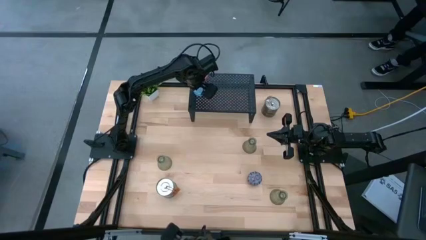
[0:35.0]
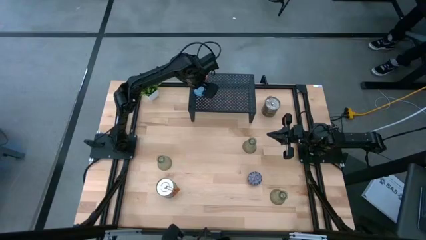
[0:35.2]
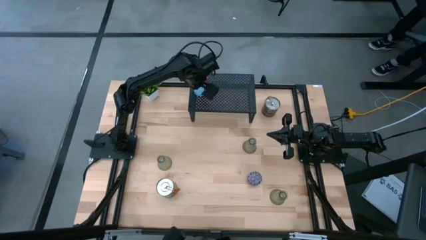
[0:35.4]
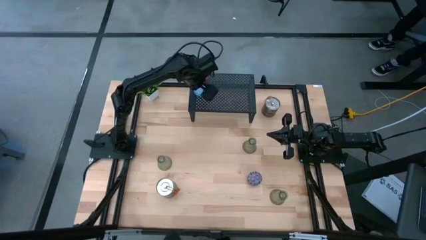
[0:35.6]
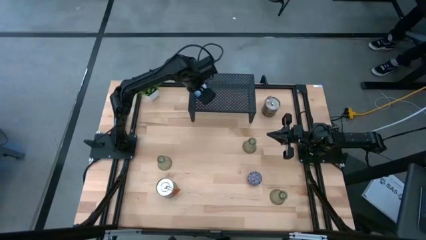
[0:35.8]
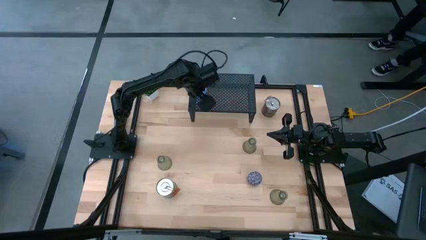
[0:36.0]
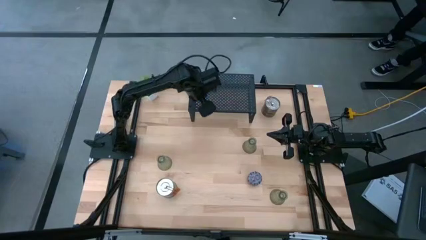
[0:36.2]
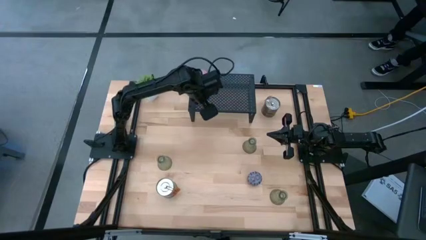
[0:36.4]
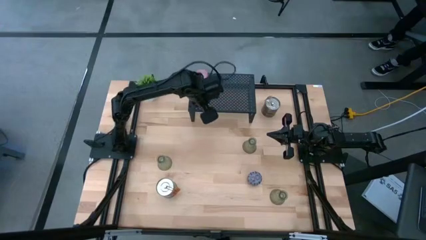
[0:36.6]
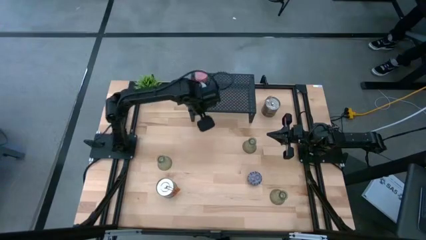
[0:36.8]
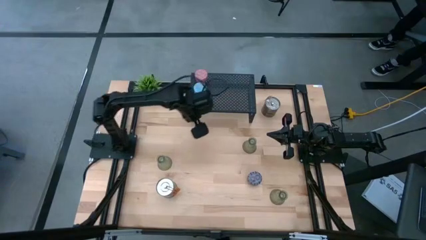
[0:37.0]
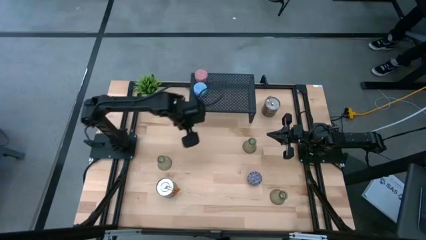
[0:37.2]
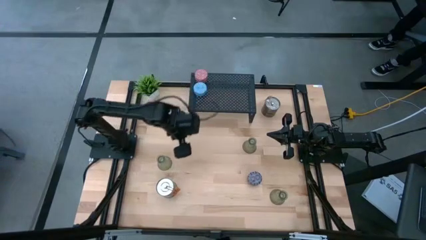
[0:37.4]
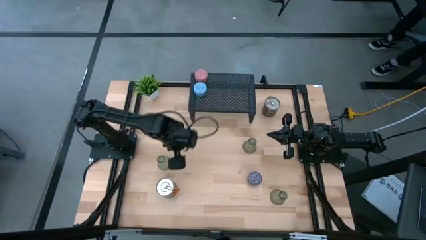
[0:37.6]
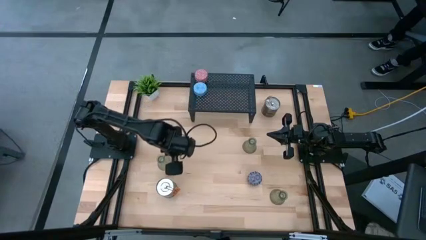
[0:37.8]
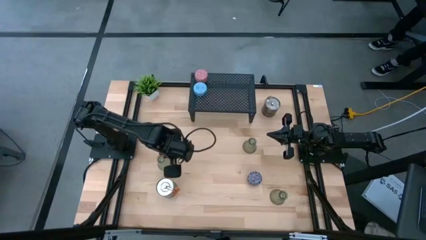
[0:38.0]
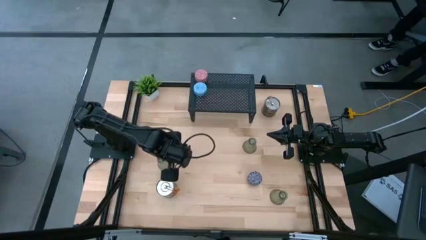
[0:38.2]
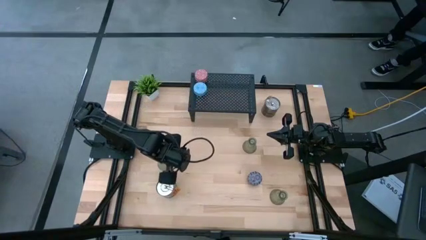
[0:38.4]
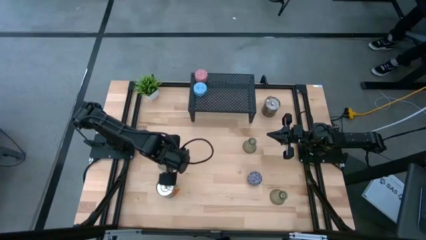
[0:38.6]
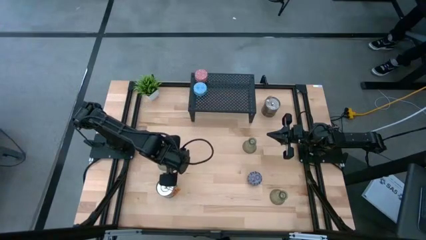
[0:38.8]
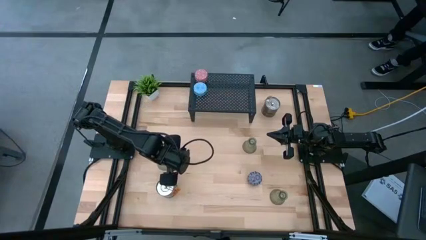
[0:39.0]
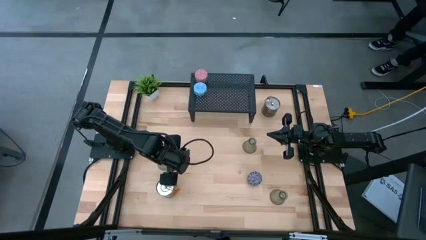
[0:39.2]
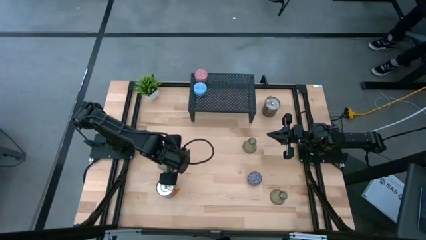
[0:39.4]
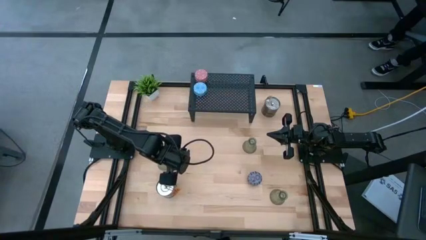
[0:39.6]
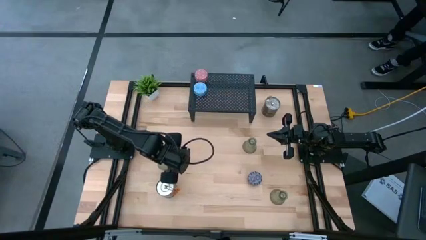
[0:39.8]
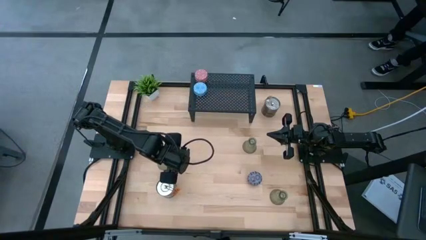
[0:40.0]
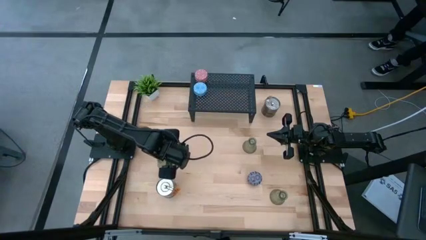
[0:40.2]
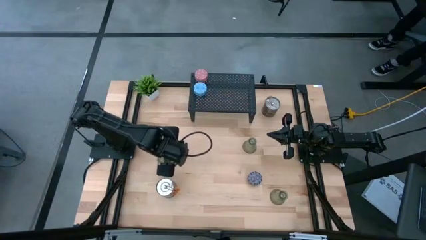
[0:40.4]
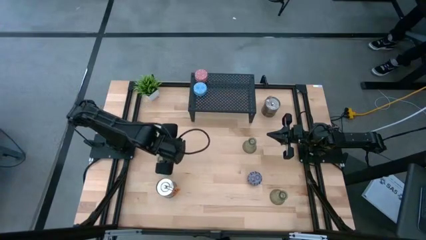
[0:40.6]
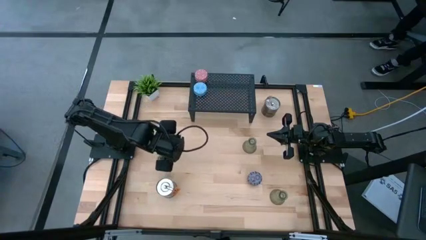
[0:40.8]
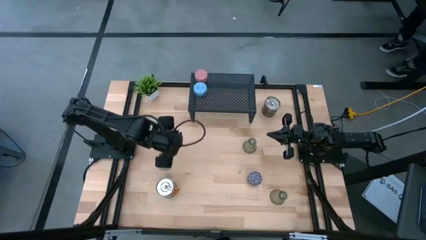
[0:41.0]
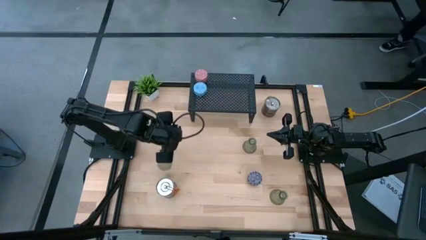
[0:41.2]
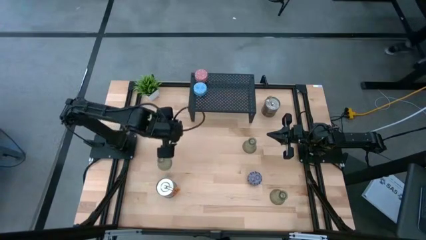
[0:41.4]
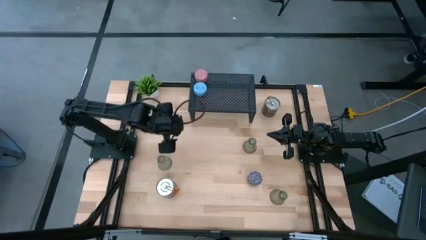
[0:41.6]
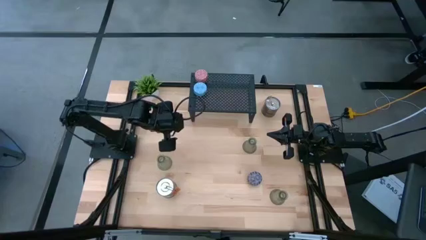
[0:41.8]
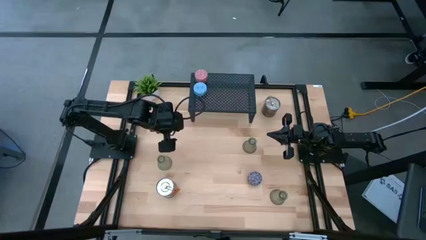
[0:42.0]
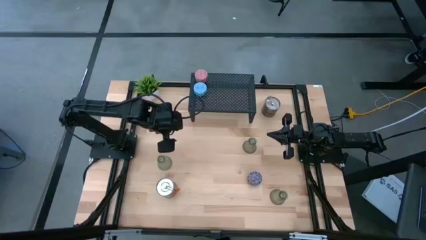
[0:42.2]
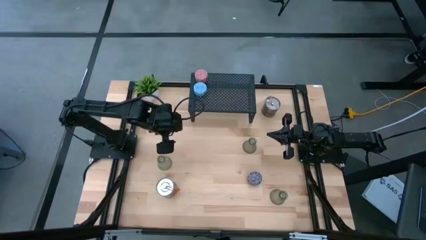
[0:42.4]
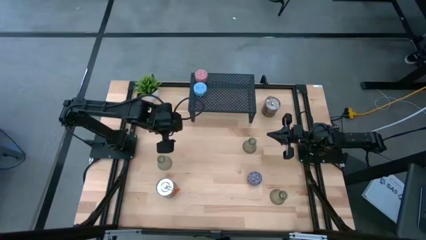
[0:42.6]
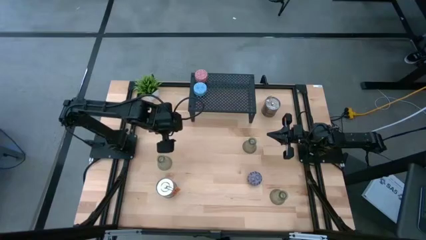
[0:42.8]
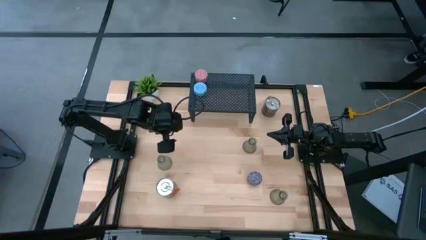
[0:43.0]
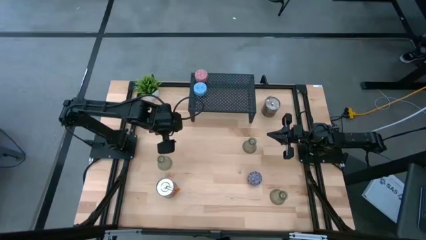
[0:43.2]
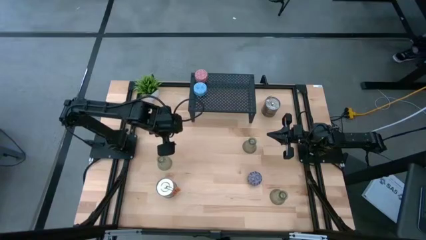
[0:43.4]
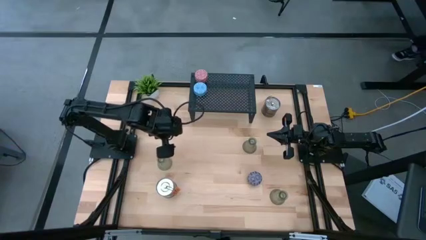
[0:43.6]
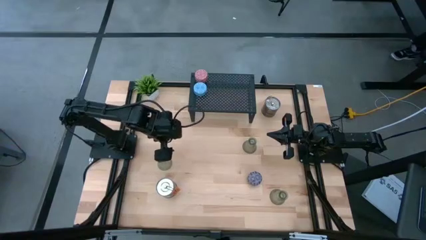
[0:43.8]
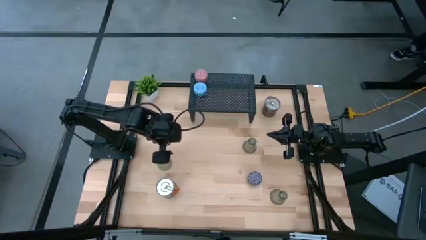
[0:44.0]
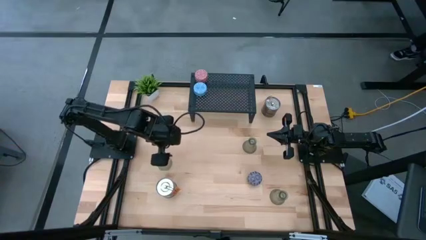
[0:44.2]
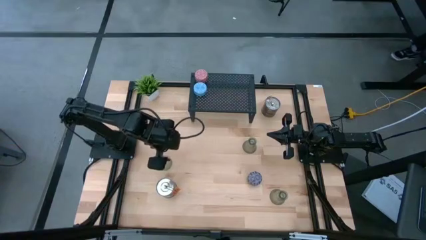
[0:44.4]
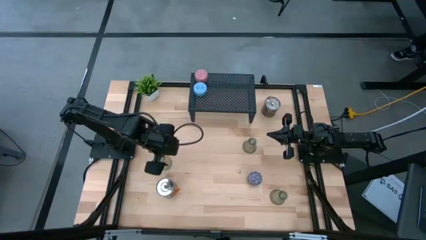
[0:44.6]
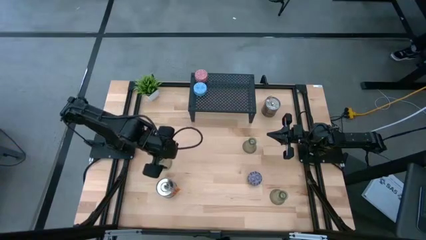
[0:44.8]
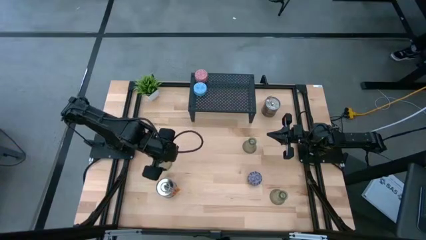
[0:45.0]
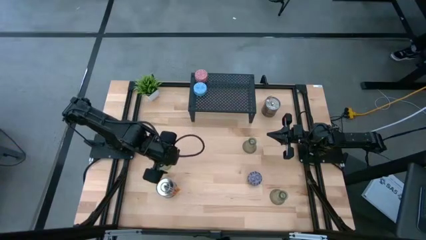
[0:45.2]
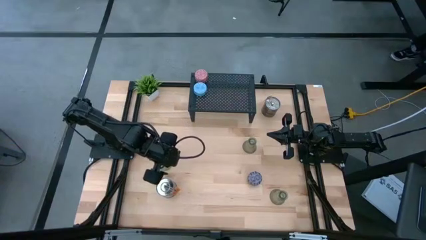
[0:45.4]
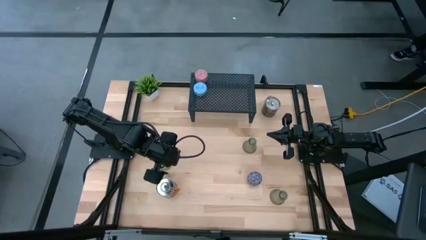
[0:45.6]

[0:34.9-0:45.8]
Task: Pick & Place candle stick holders
Put the top left green candle holder on the shelf
